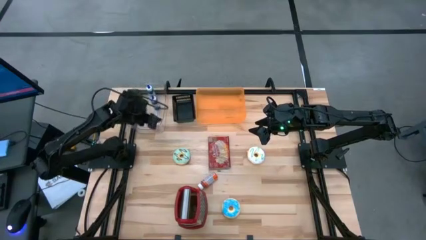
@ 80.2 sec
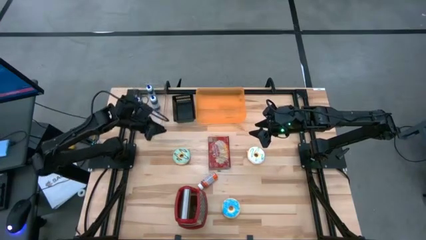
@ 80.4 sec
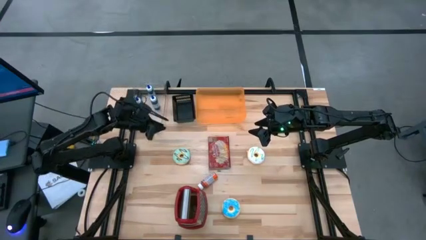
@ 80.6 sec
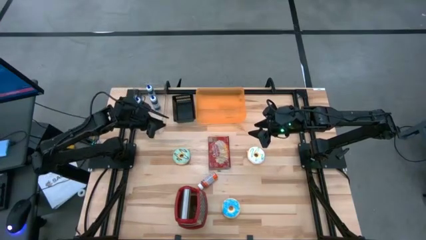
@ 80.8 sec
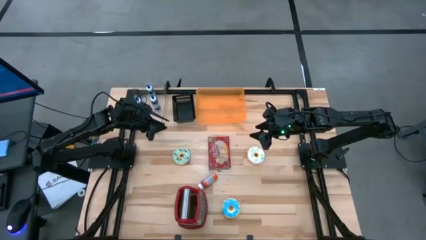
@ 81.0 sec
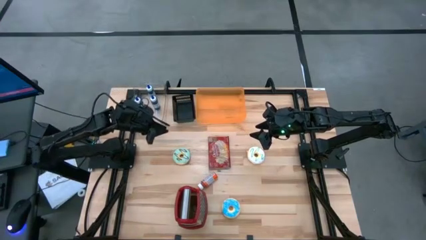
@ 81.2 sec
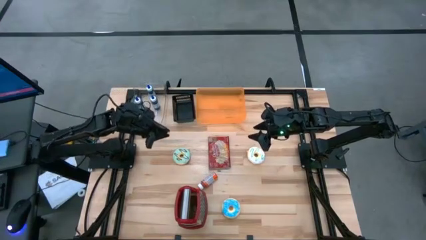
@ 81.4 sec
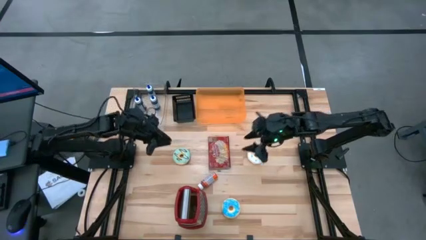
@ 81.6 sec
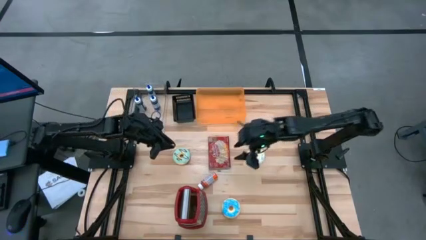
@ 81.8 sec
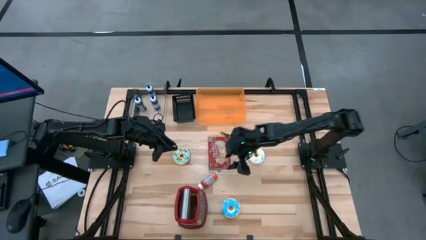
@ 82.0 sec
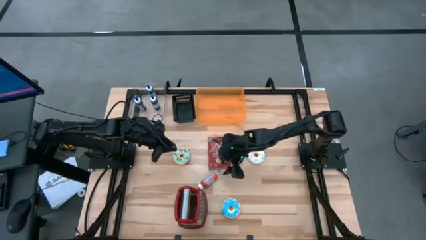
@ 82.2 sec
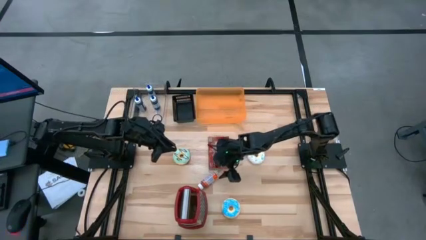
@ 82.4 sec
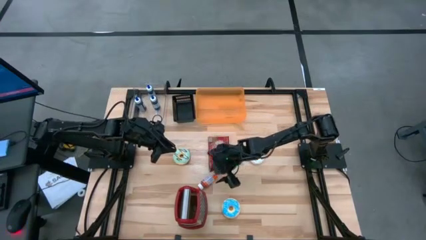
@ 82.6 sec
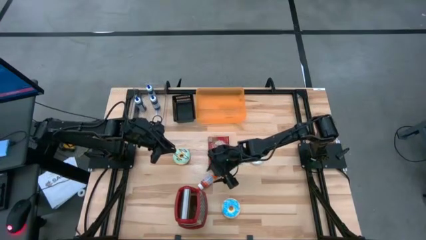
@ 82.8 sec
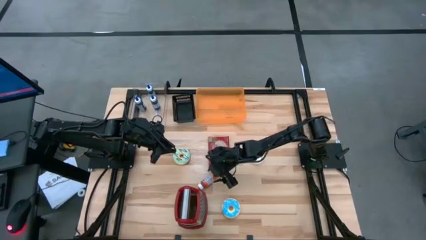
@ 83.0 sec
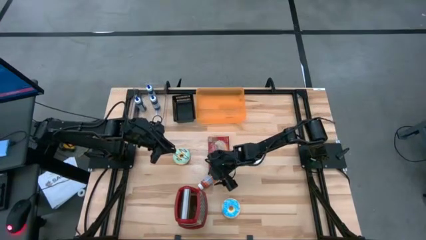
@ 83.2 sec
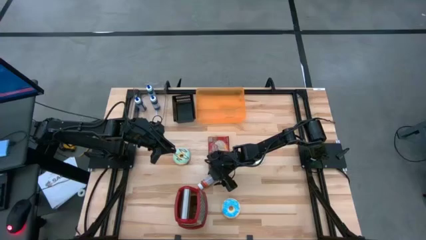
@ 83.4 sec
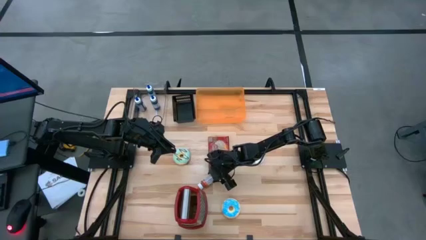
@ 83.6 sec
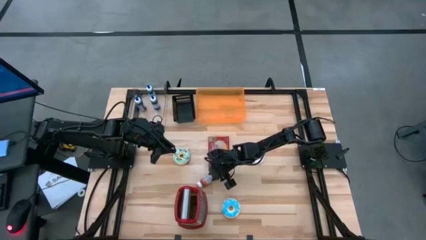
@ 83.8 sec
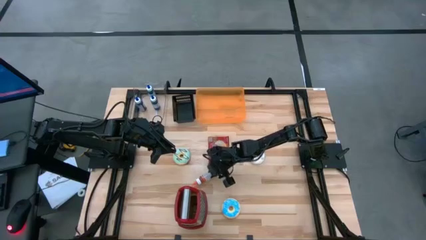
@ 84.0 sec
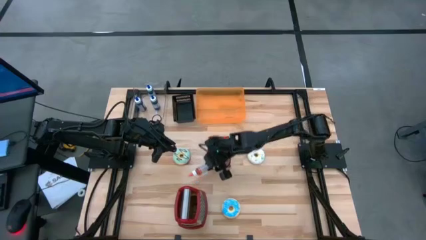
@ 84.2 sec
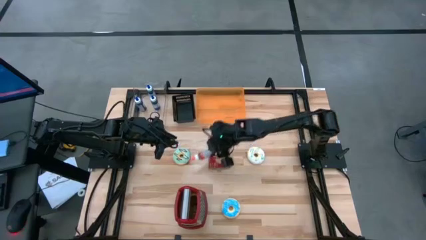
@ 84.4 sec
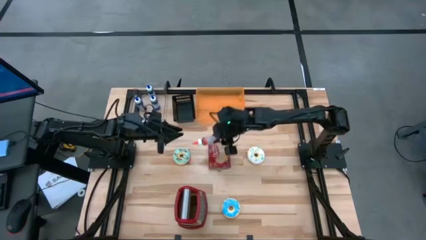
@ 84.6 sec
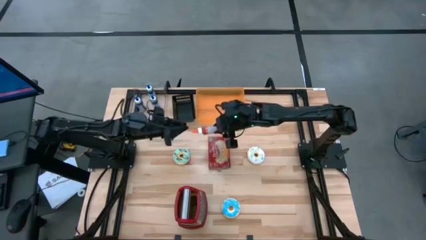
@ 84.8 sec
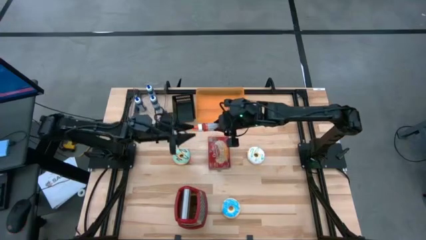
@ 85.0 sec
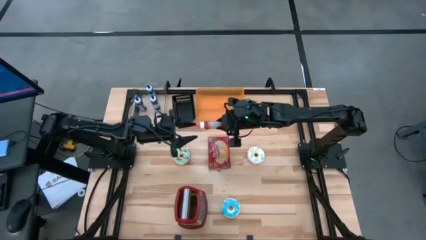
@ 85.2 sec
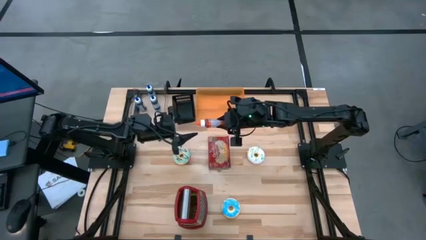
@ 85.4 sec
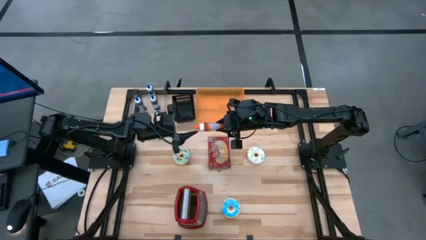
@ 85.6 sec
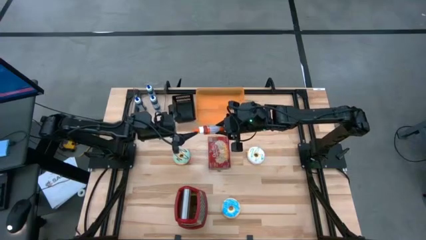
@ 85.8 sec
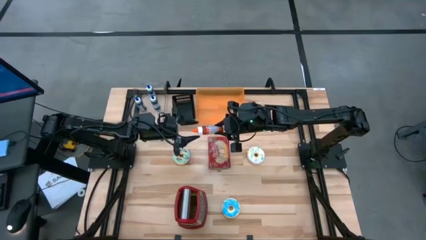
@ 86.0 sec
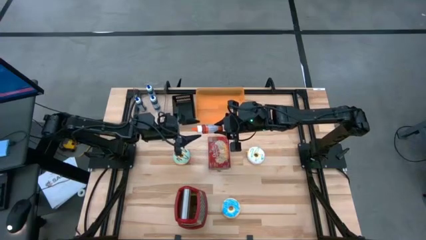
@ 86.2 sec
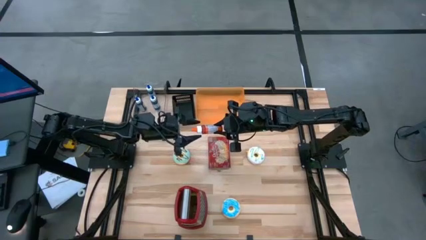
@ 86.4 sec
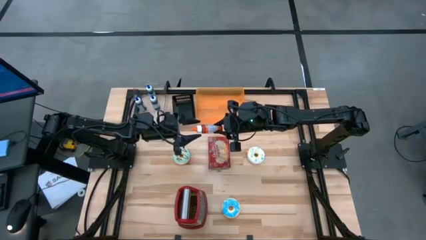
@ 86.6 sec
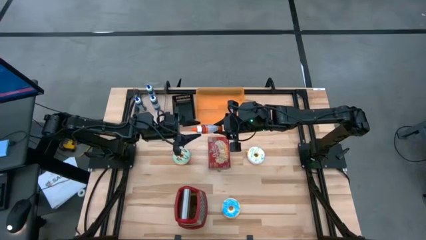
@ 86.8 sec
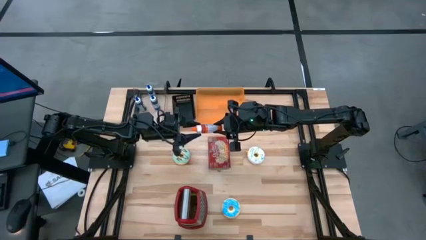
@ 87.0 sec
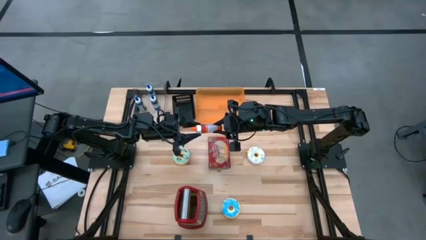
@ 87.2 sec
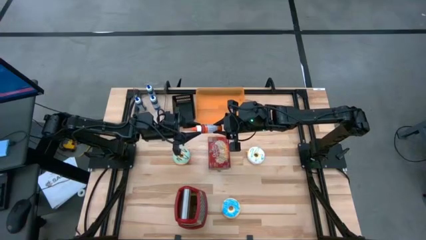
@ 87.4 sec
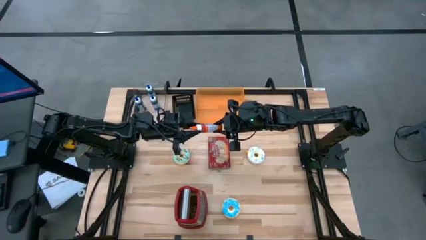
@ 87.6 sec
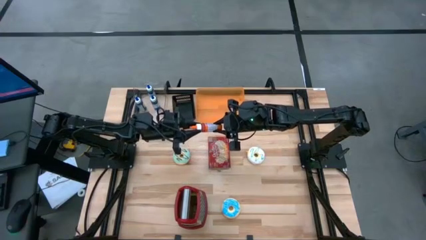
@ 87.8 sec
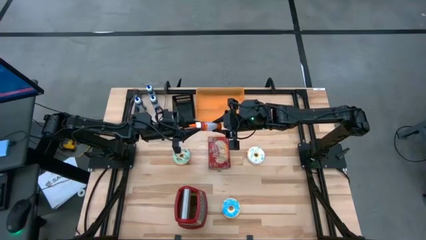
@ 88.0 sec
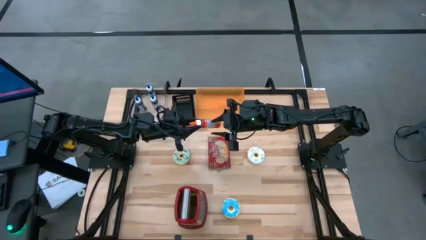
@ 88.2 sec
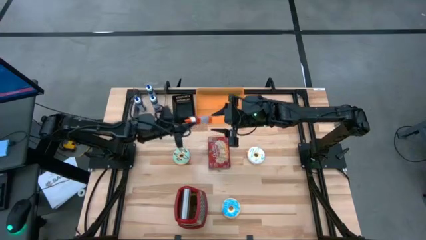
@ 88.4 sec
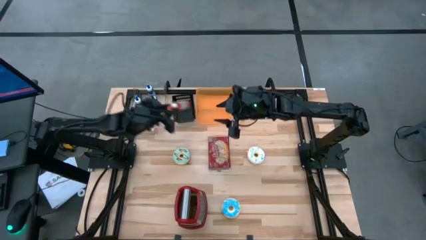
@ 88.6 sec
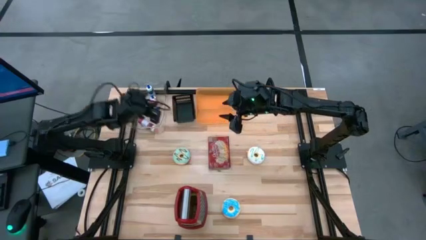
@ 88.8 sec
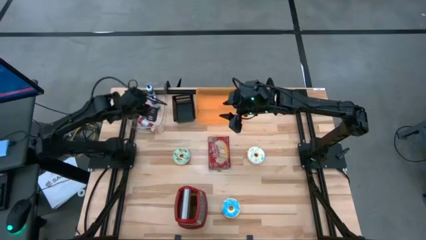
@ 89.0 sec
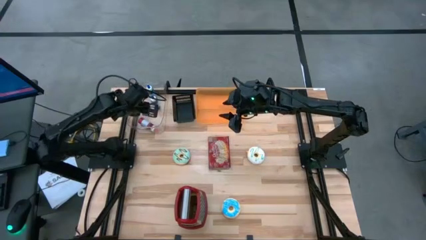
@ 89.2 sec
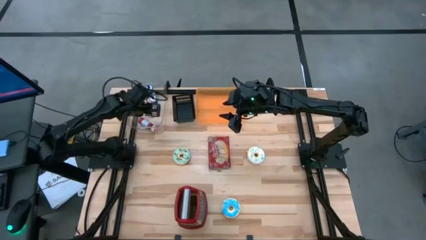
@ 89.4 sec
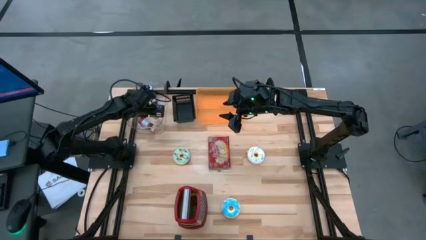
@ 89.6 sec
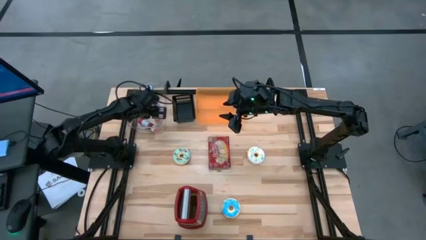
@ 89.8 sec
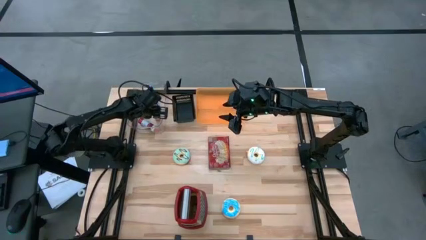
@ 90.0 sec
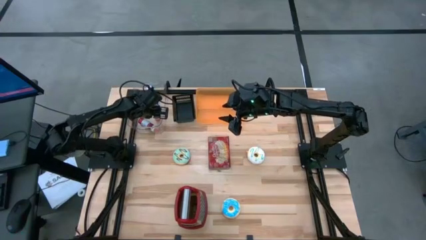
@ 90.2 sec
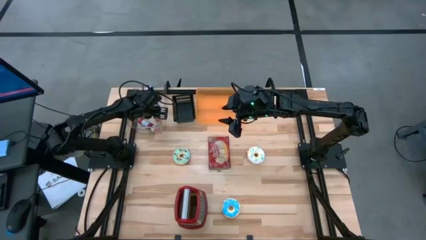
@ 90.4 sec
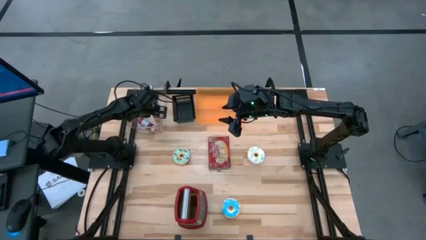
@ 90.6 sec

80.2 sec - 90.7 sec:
Put the orange food coloring bottle into the transparent bin

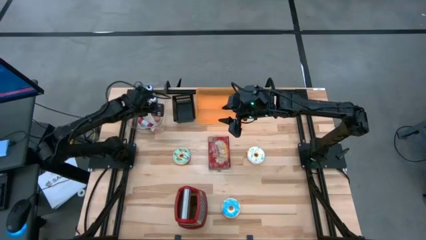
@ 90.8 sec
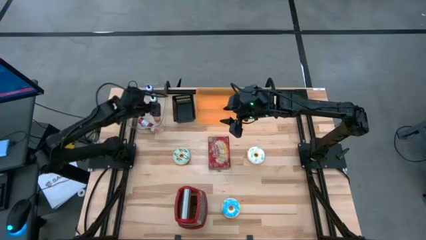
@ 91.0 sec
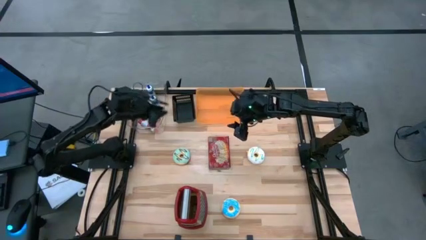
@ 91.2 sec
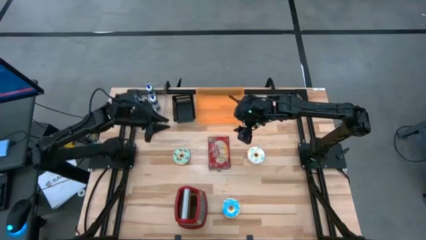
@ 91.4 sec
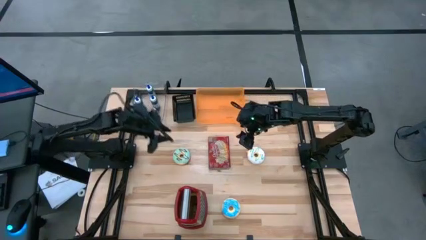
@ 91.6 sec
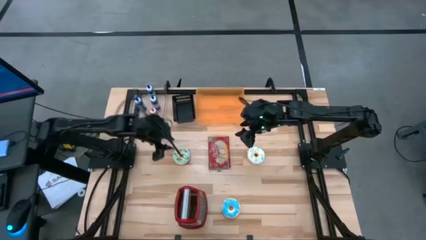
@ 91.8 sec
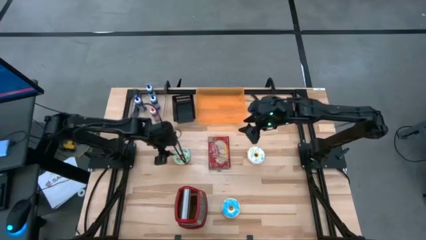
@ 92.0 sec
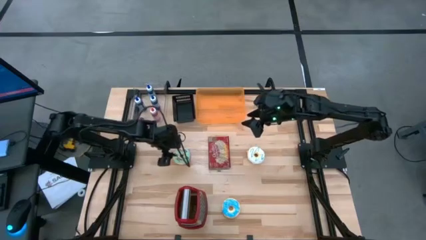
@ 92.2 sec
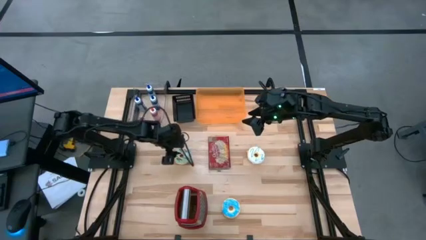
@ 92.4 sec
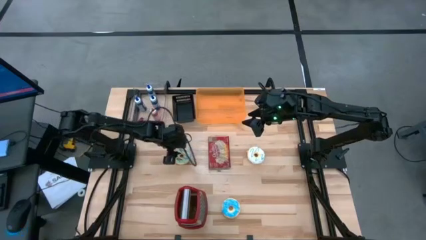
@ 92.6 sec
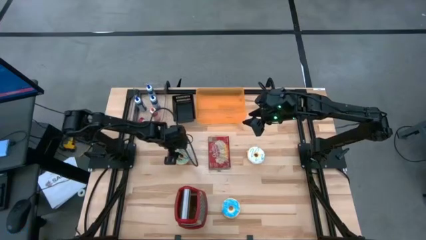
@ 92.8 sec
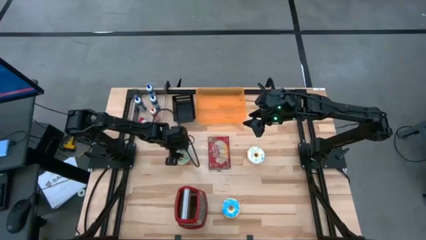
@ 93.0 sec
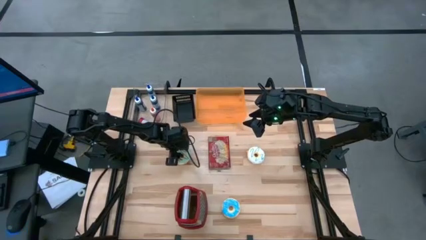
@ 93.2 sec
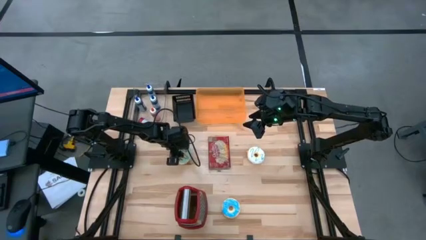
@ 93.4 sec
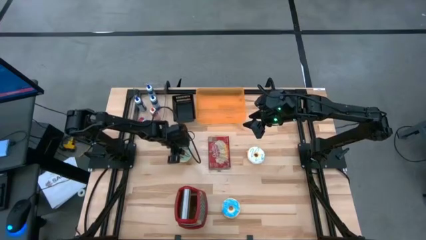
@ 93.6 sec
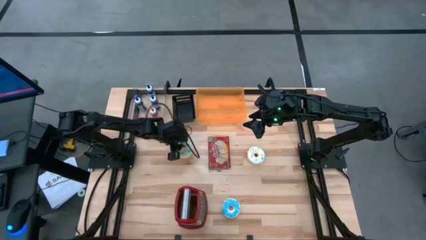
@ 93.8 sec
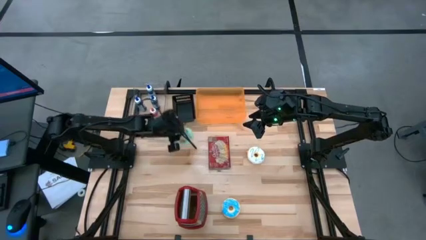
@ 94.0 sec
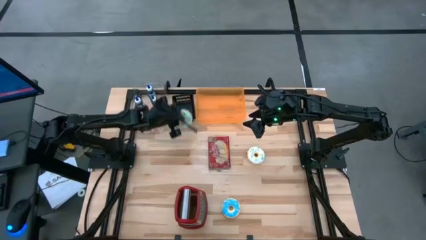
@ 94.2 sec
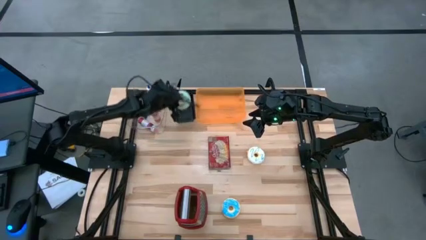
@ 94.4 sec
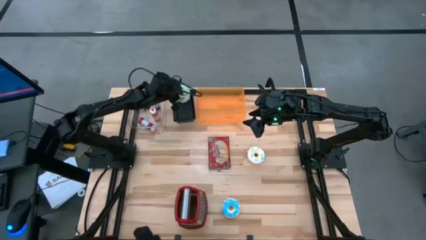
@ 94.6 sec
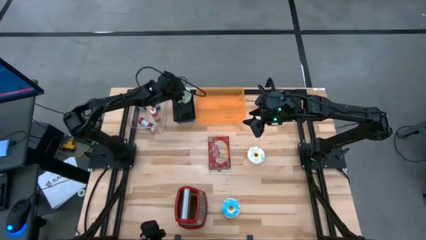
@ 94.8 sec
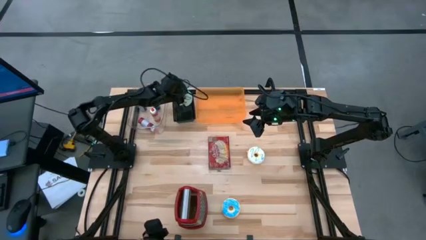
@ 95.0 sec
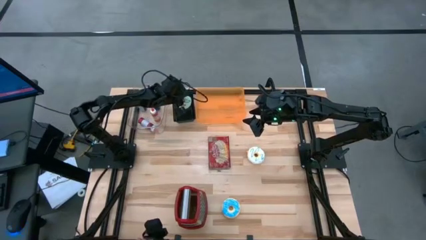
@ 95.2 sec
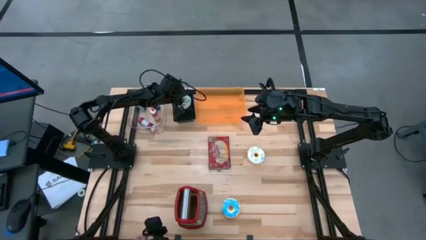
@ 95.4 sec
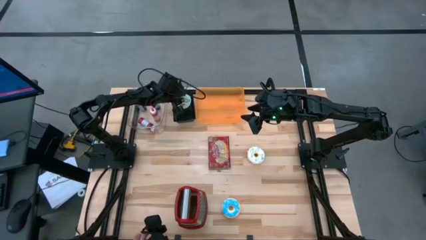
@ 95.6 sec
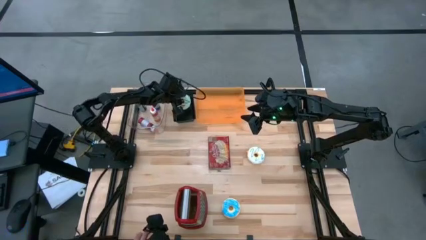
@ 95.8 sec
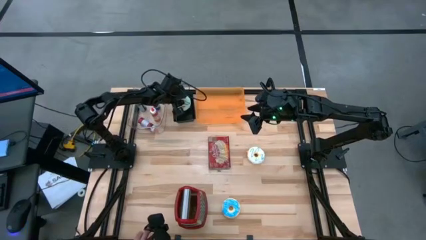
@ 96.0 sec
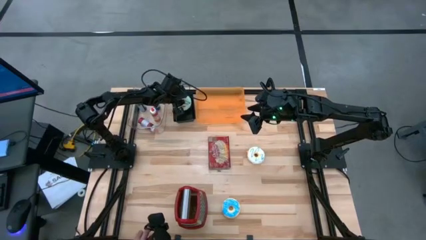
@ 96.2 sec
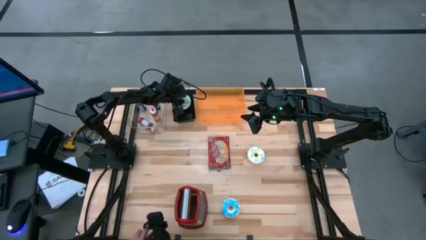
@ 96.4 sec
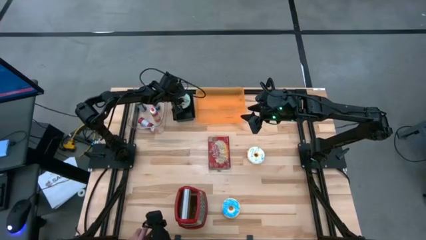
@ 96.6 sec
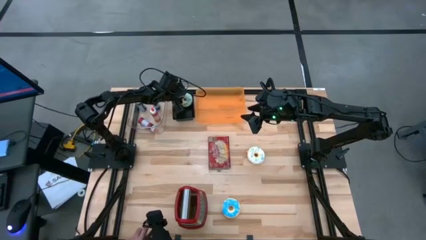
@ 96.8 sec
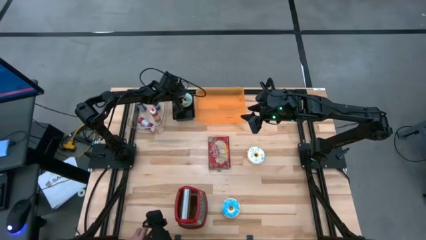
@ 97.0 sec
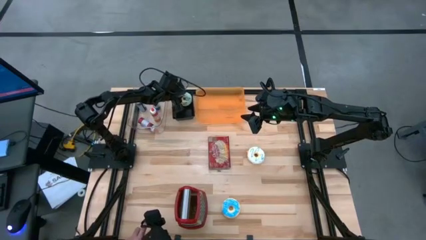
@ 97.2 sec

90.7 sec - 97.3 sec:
Put the light blue donut into the black bin
